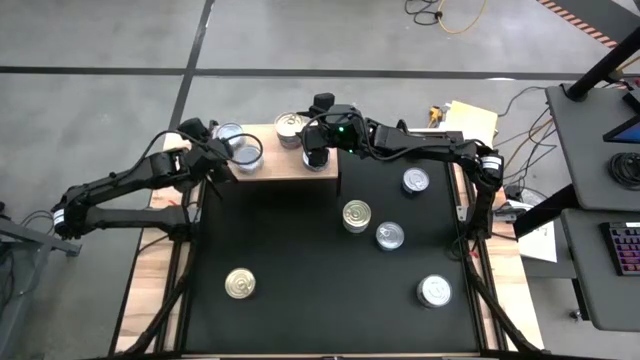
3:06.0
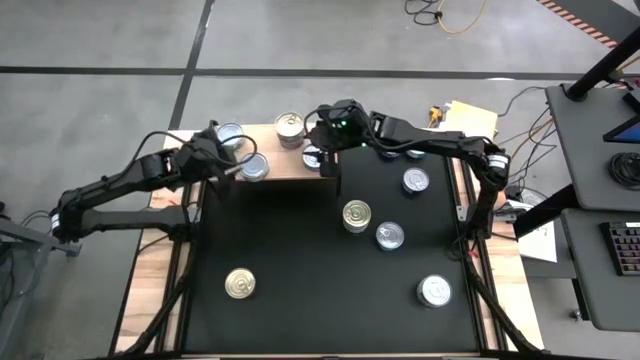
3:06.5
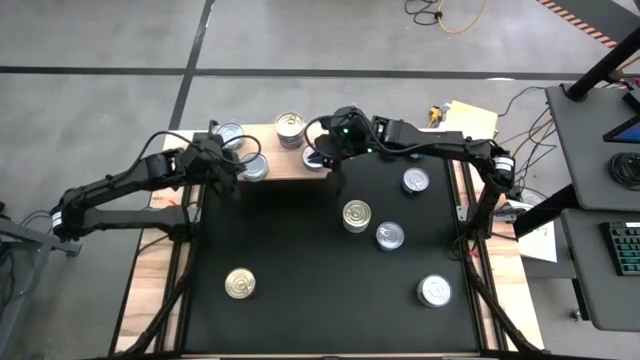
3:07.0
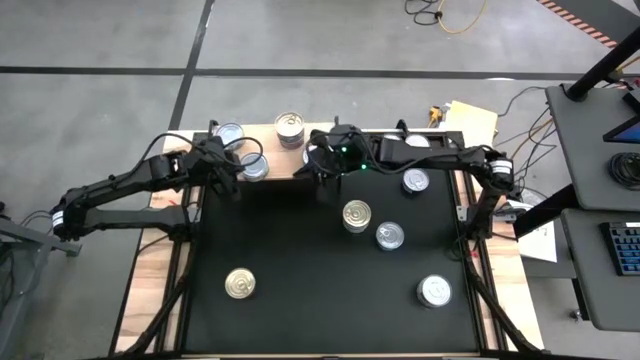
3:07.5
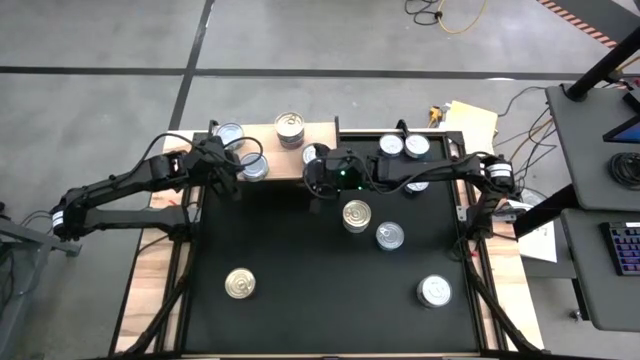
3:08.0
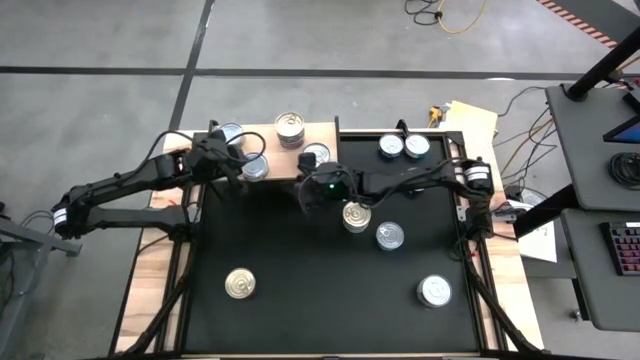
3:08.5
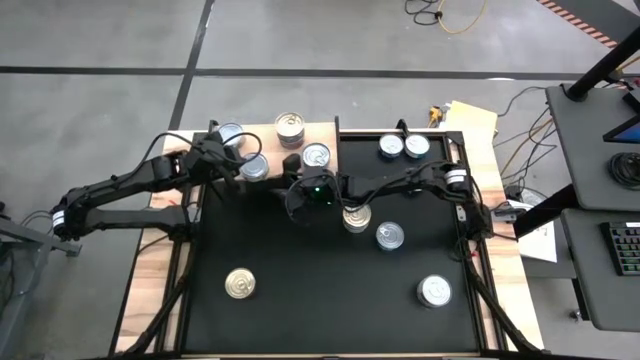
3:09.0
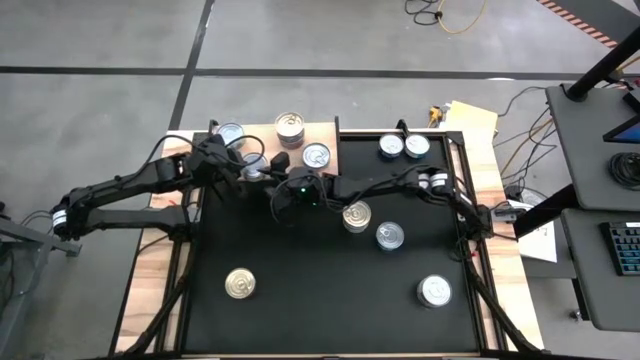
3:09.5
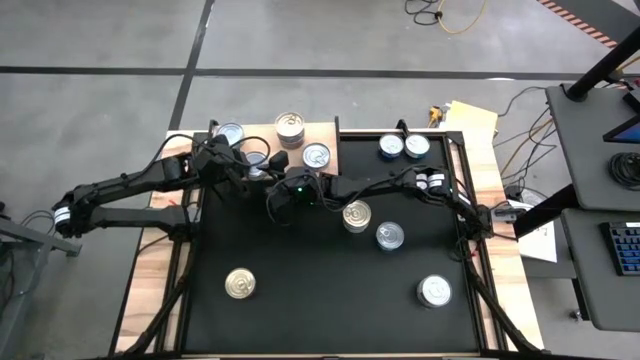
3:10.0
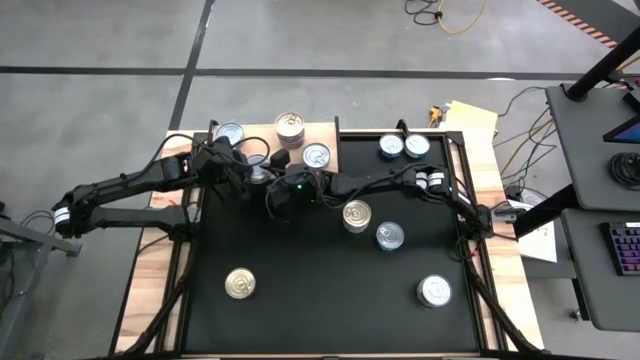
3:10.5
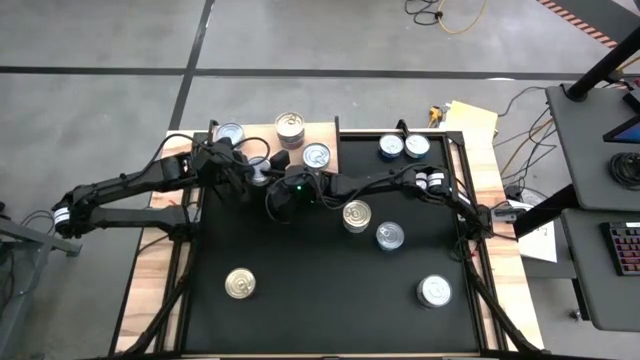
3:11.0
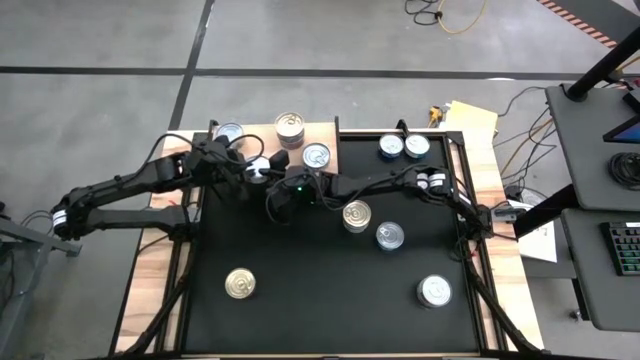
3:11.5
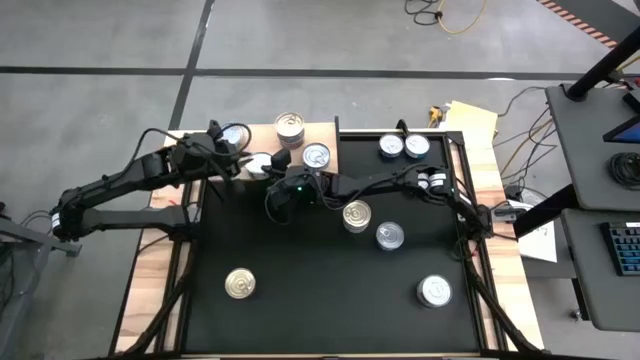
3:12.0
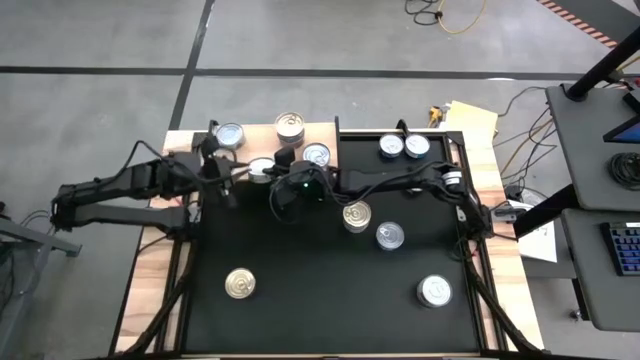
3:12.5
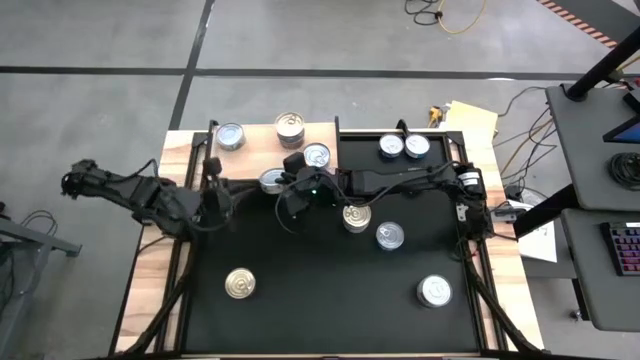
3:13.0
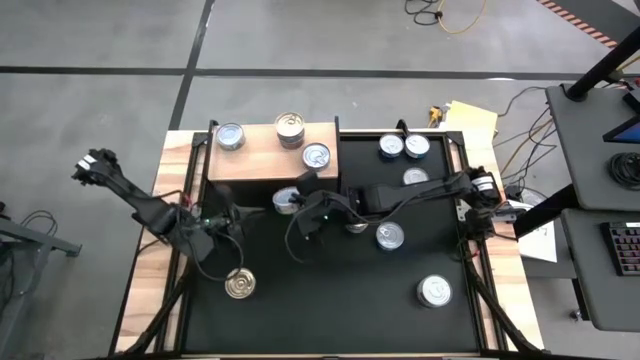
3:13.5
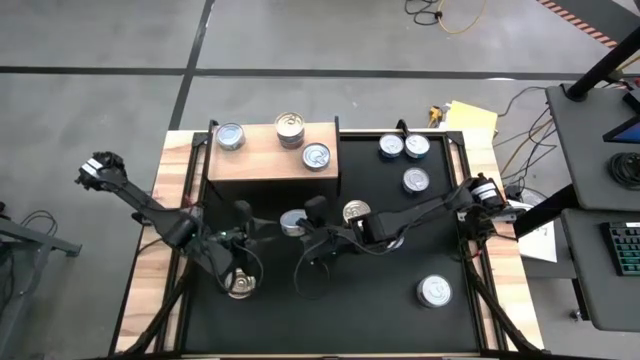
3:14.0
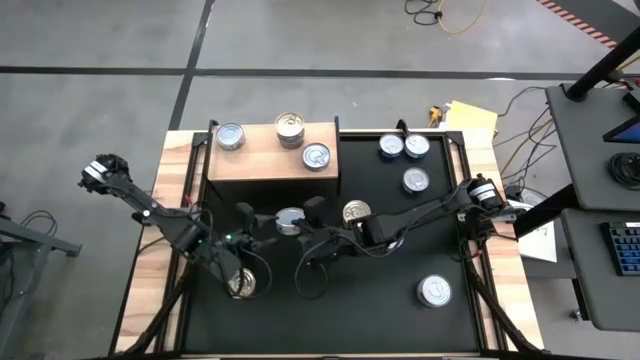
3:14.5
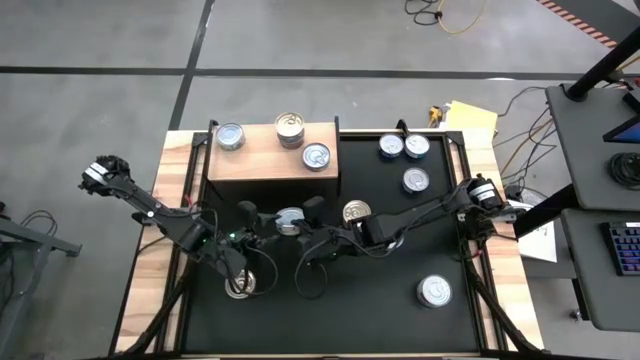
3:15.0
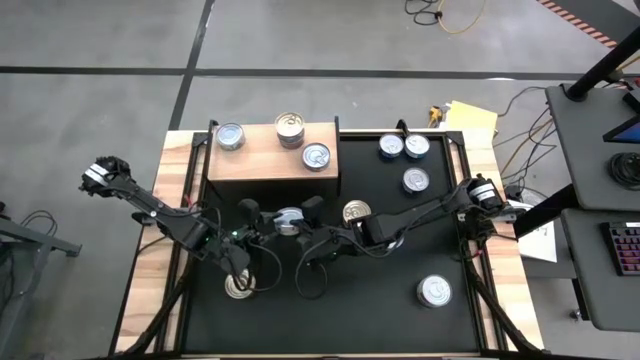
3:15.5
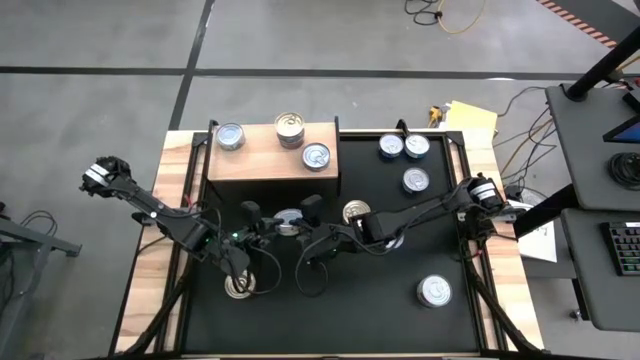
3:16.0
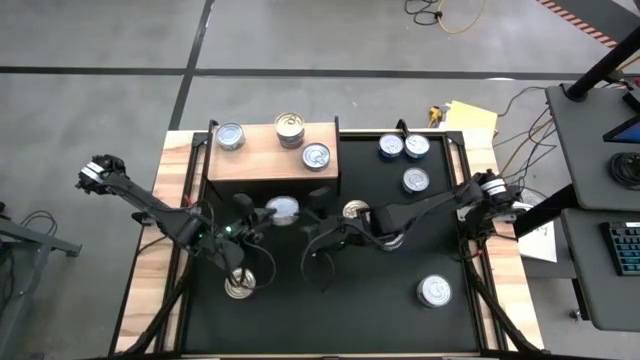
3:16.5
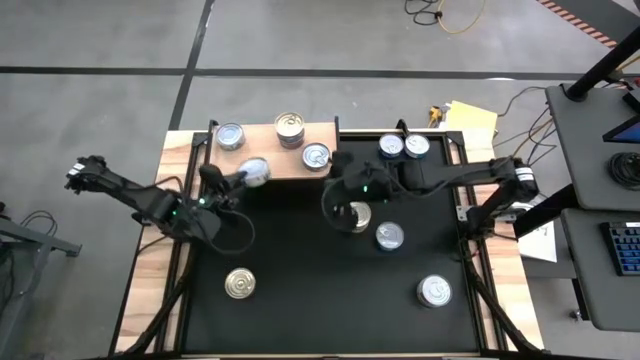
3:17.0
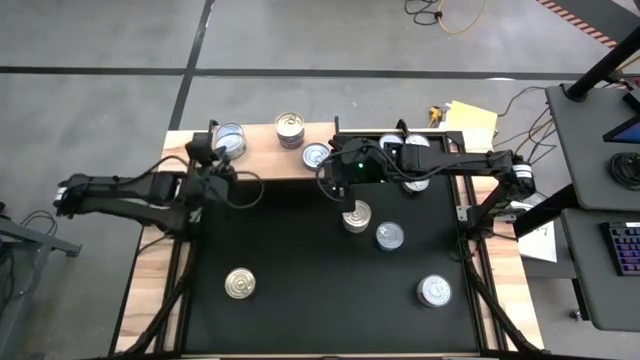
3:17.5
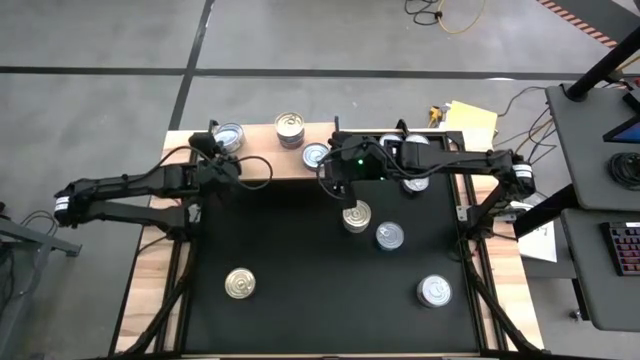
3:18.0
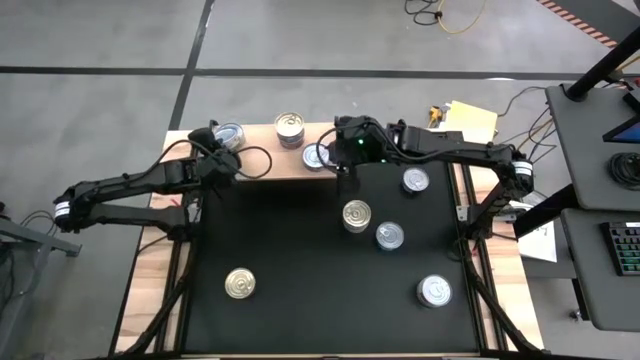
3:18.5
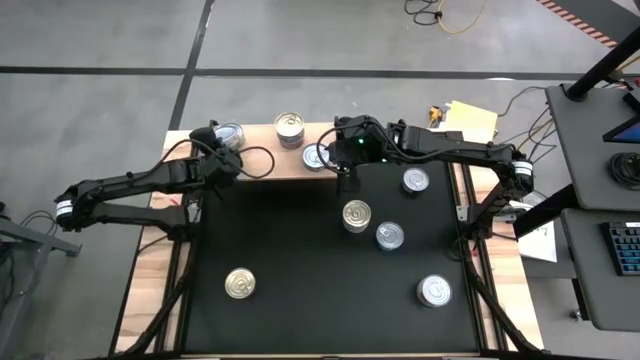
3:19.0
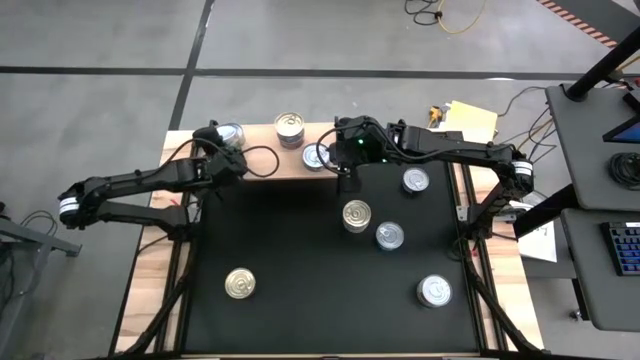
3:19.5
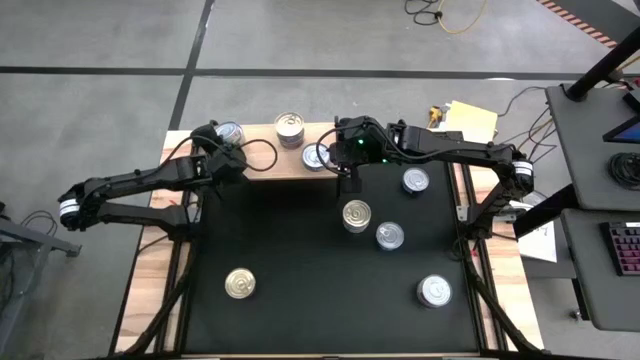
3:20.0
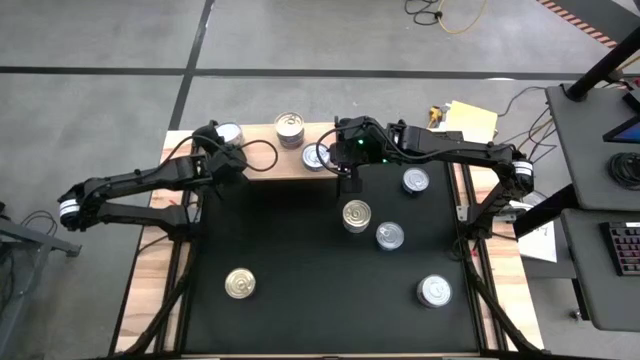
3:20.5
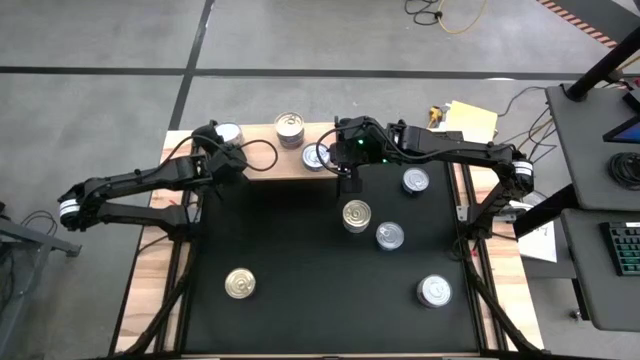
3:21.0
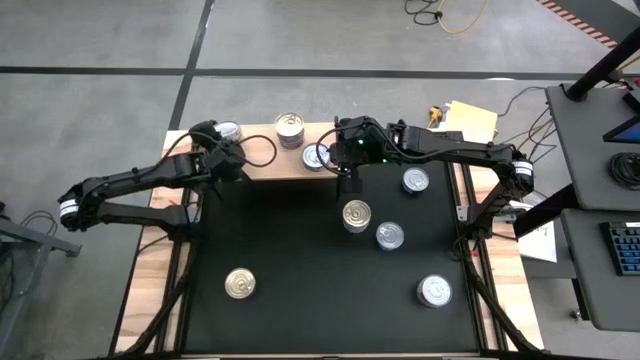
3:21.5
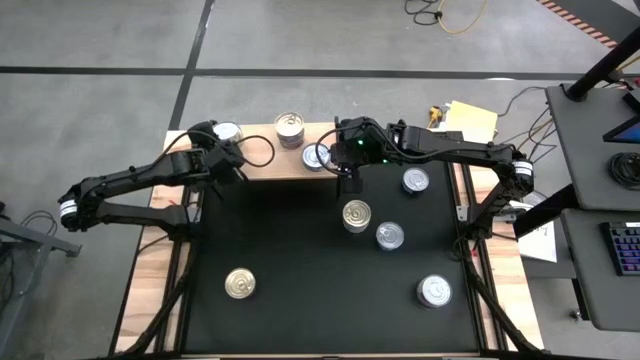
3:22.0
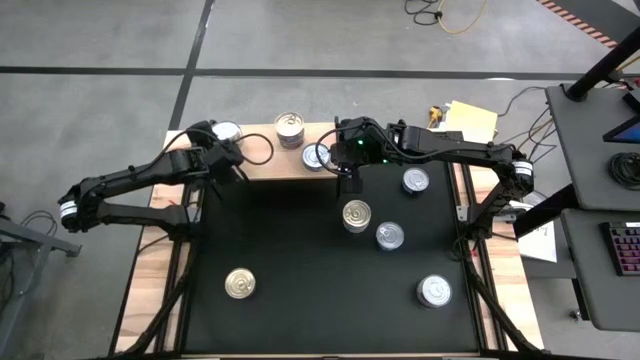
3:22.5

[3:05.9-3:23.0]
Task: Stack canned seafood by type on shelf
Stack the green/white tuna can on top of the other green/white tuna can on the shelf

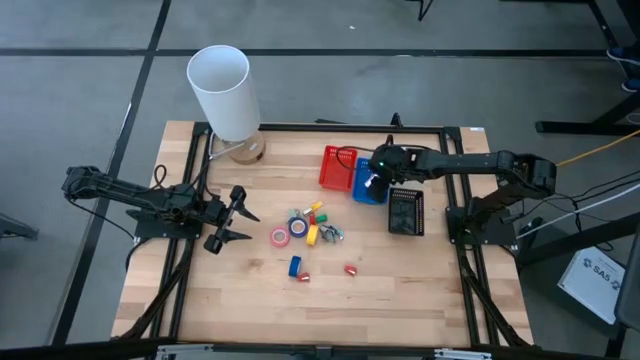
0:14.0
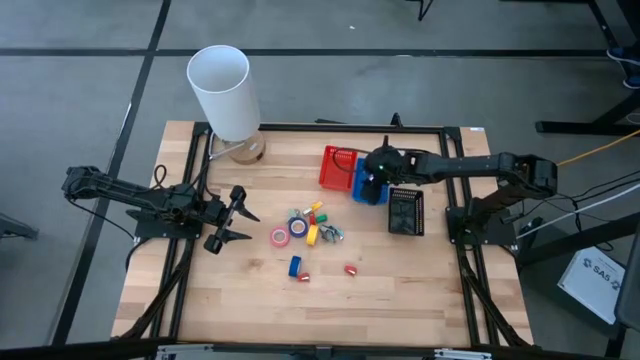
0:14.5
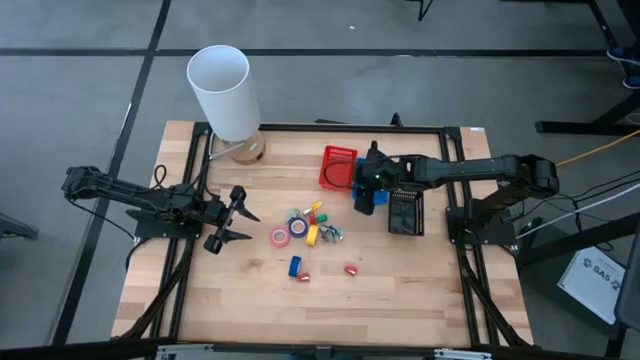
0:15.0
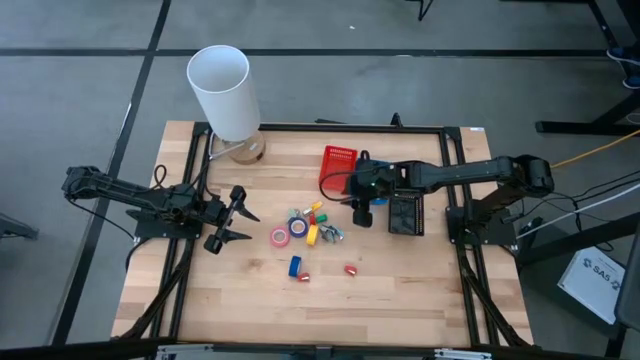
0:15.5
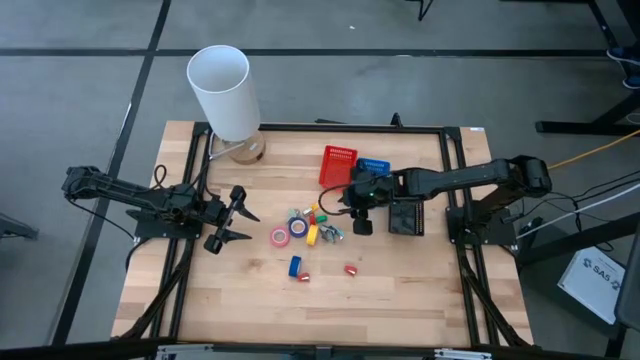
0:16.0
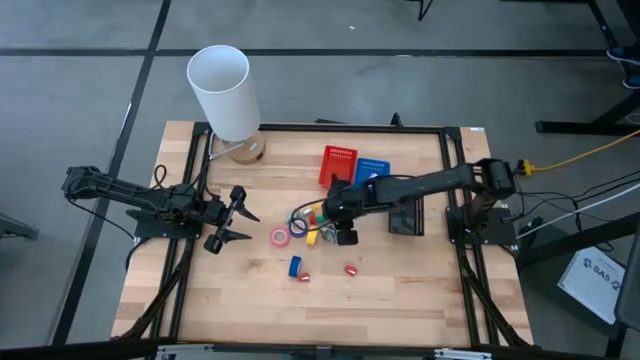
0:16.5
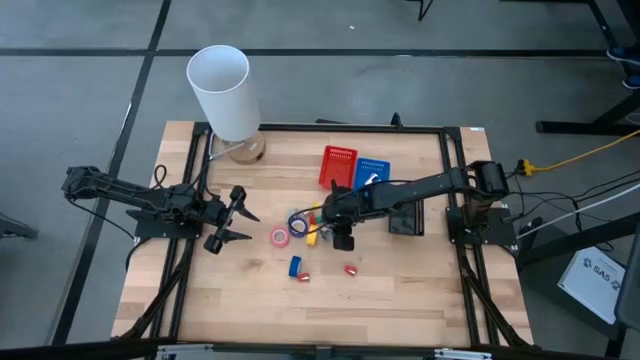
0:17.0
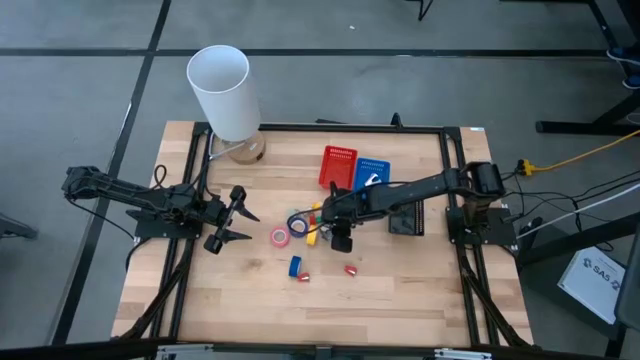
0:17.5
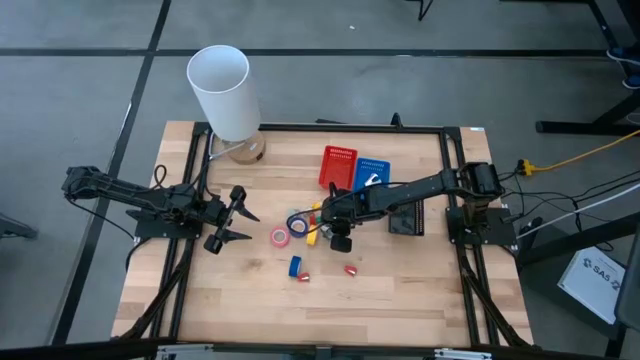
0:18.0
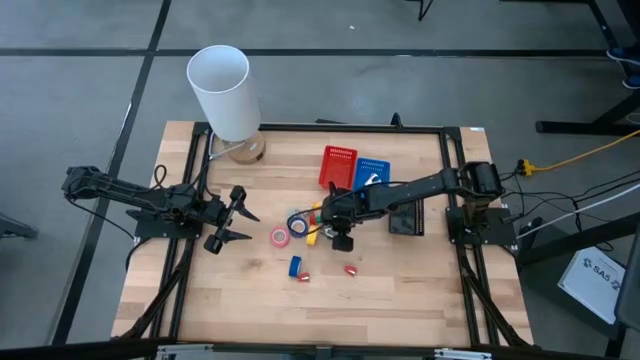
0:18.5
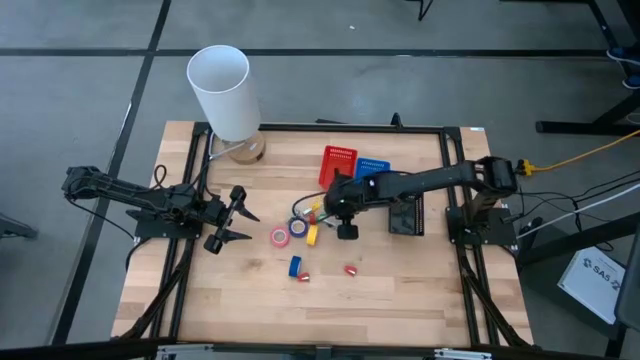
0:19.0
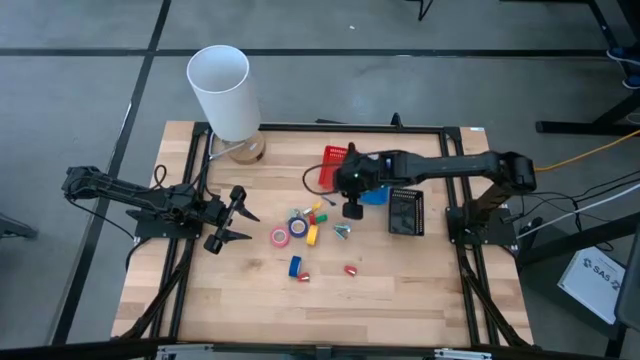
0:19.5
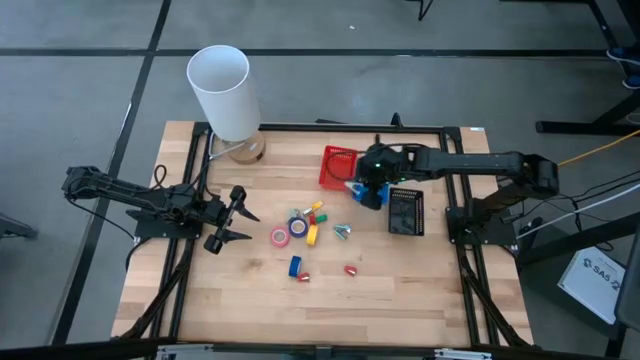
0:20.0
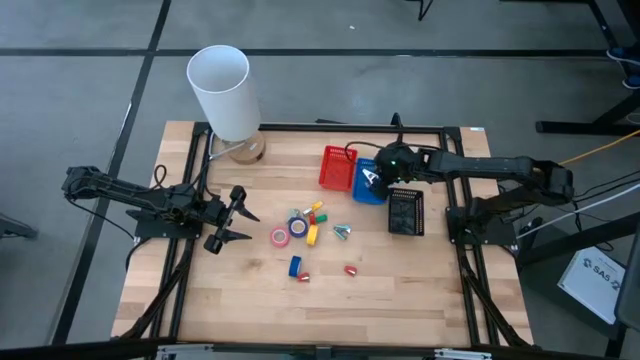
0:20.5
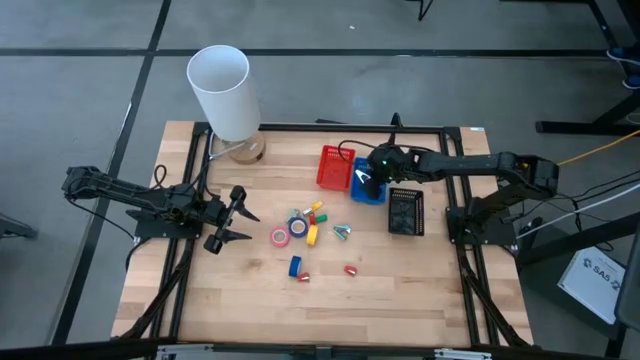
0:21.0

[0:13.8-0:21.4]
Task: Pick and place Stapler, Stapler remover, tape
Put the black staple remover into the blue bin
